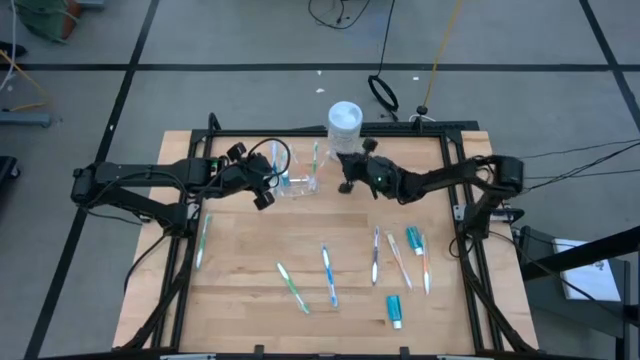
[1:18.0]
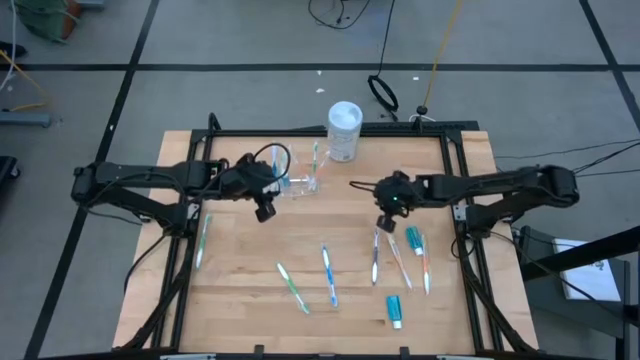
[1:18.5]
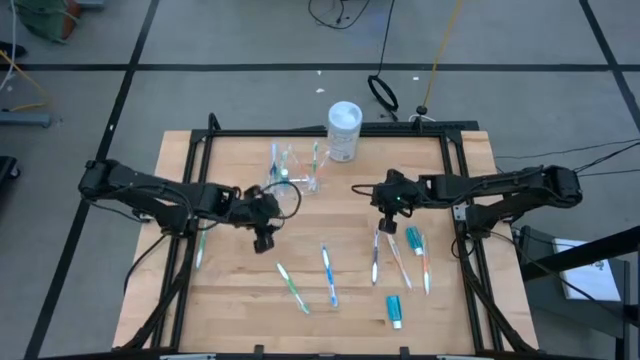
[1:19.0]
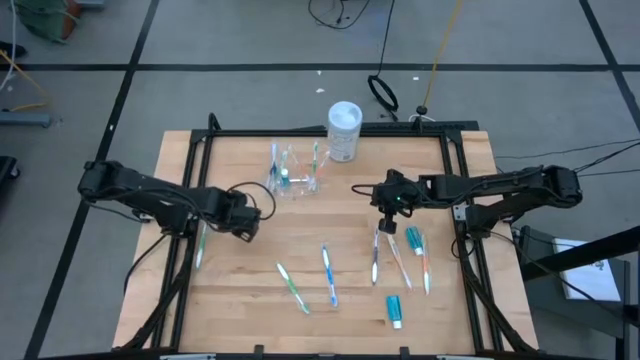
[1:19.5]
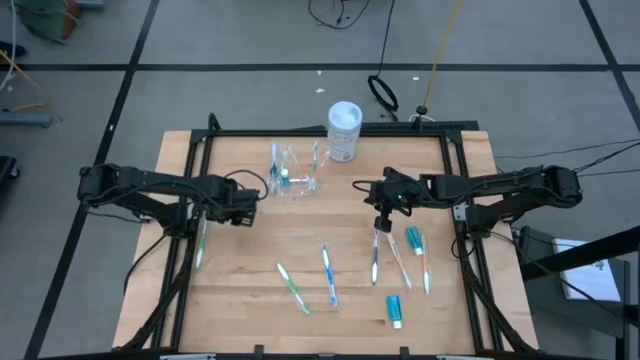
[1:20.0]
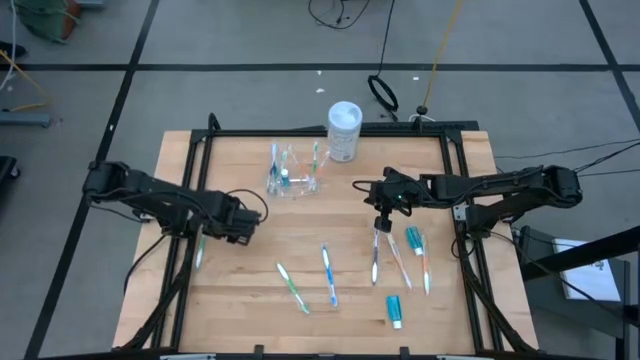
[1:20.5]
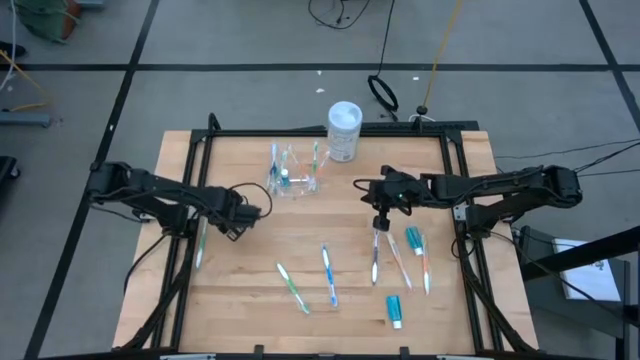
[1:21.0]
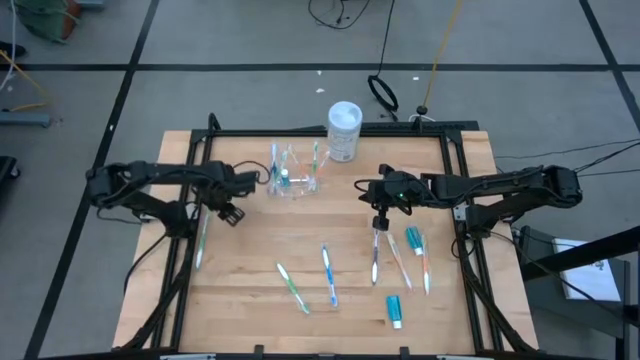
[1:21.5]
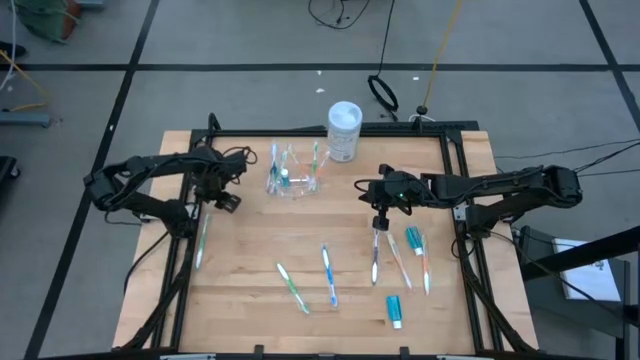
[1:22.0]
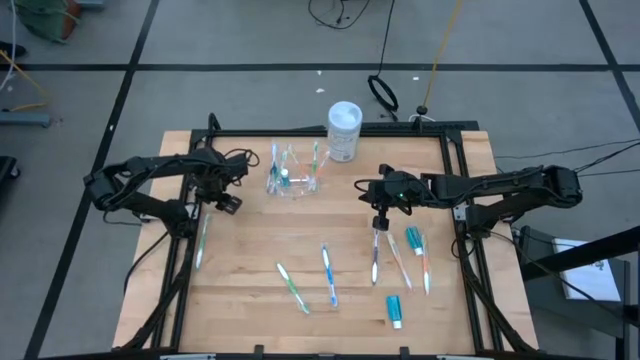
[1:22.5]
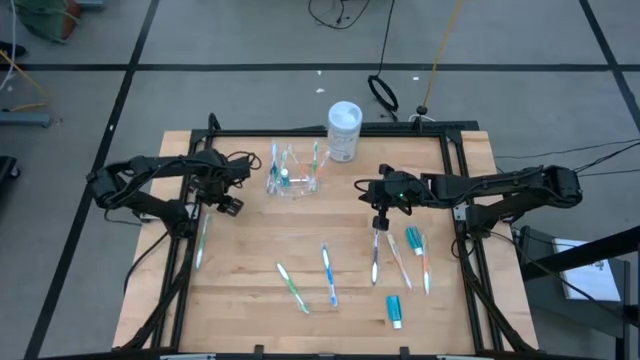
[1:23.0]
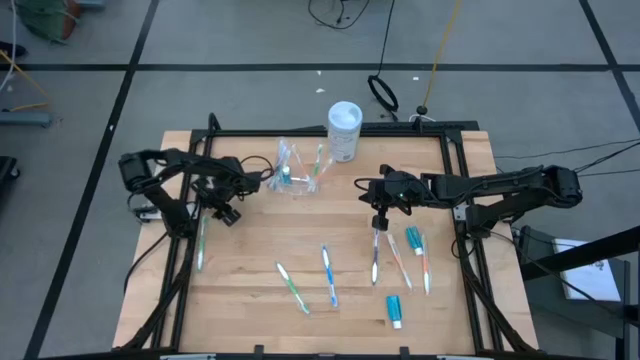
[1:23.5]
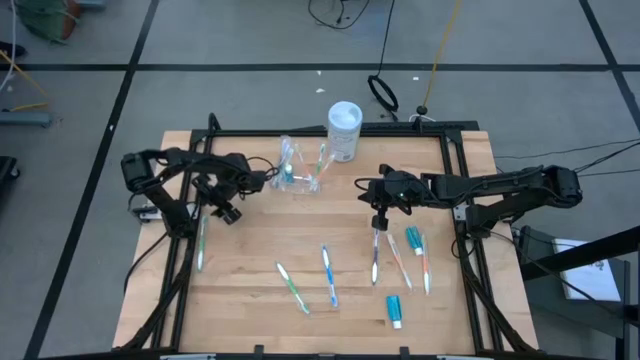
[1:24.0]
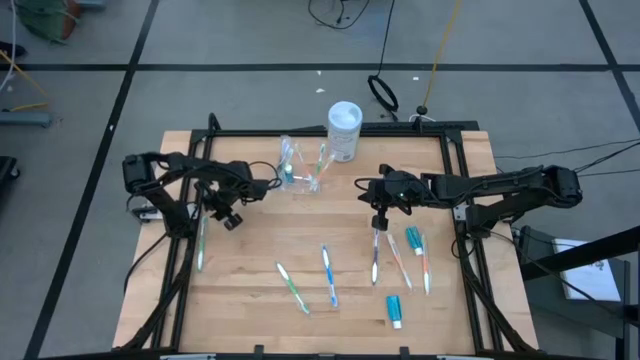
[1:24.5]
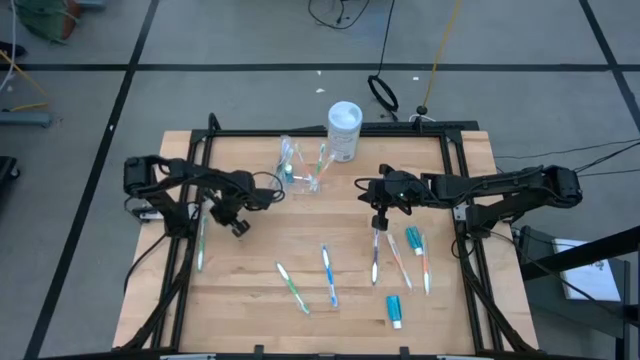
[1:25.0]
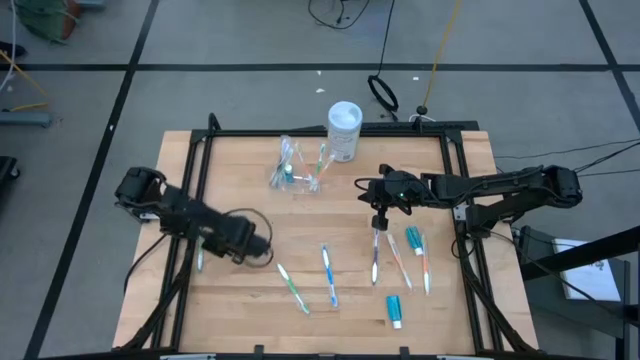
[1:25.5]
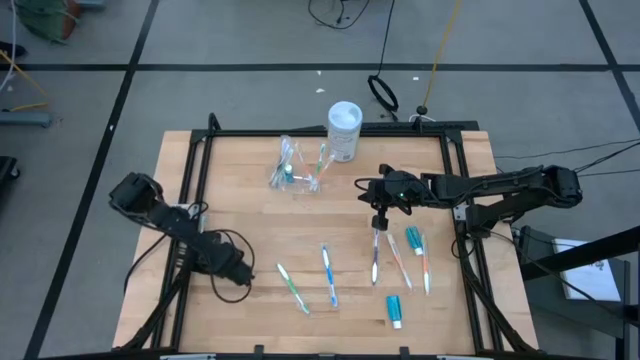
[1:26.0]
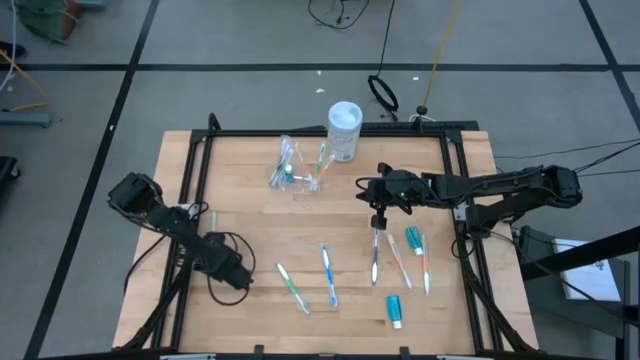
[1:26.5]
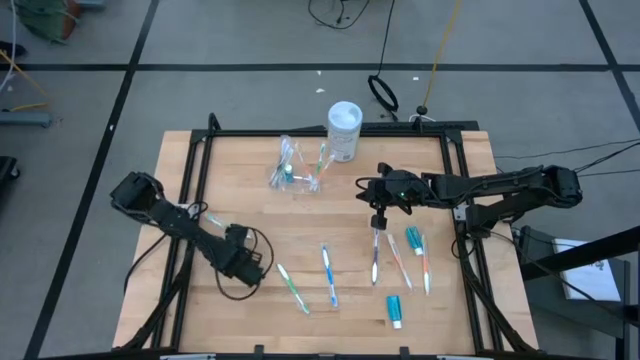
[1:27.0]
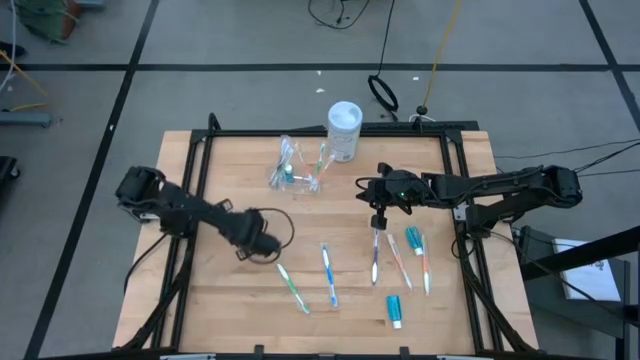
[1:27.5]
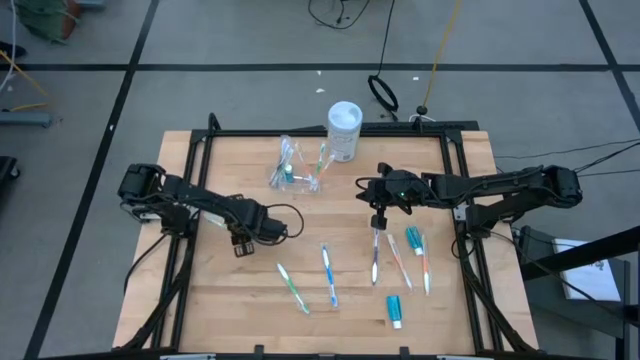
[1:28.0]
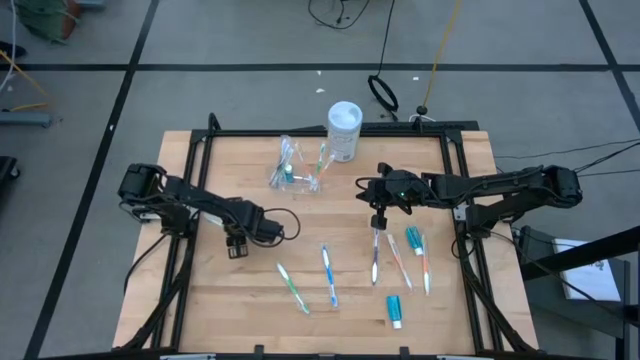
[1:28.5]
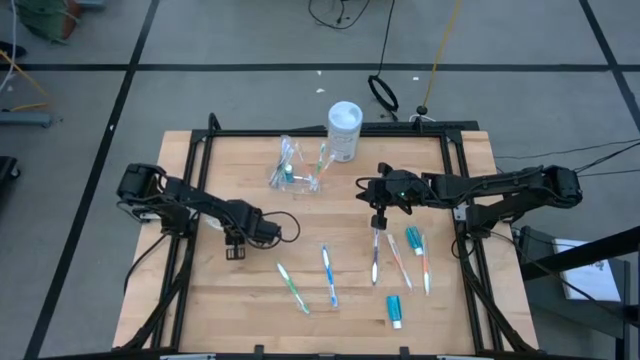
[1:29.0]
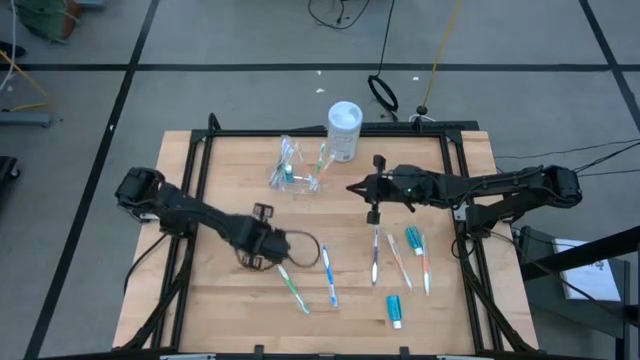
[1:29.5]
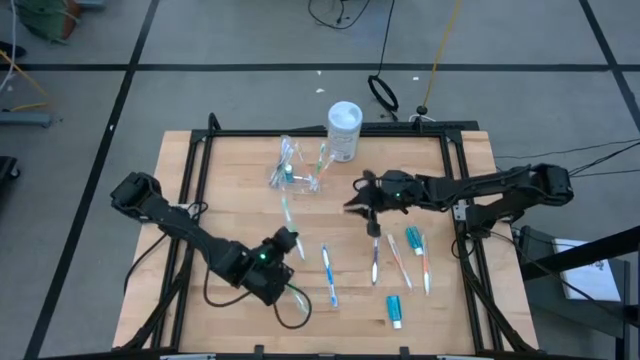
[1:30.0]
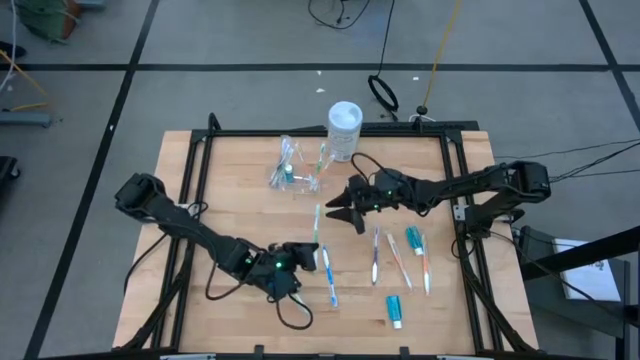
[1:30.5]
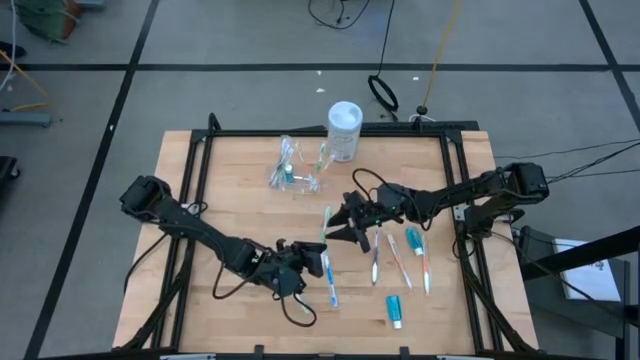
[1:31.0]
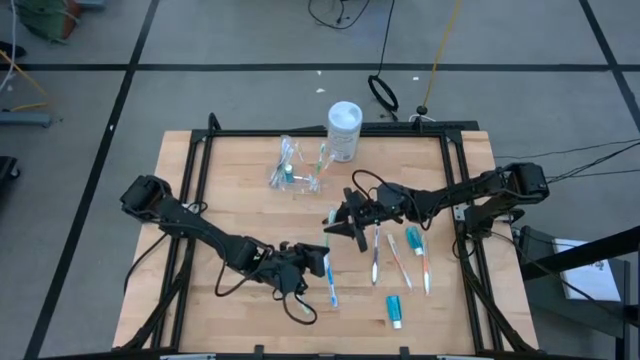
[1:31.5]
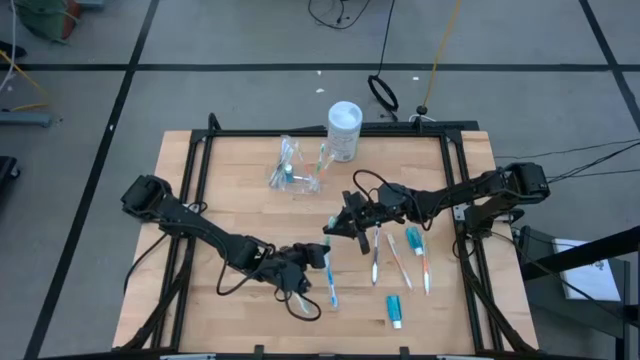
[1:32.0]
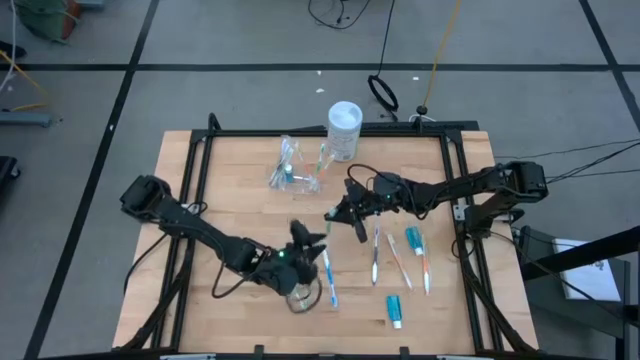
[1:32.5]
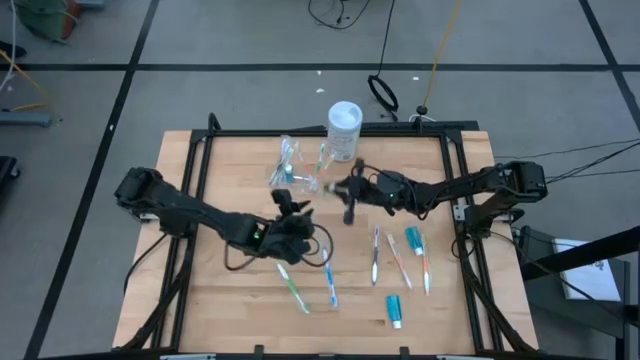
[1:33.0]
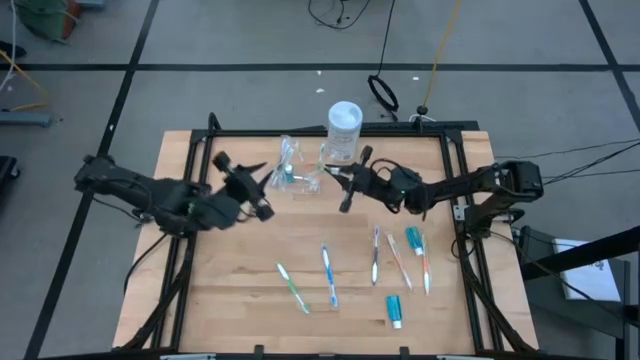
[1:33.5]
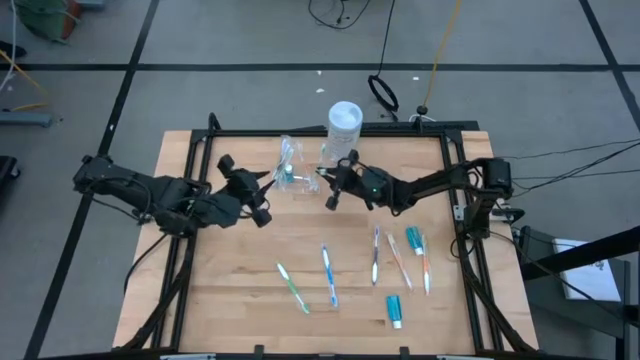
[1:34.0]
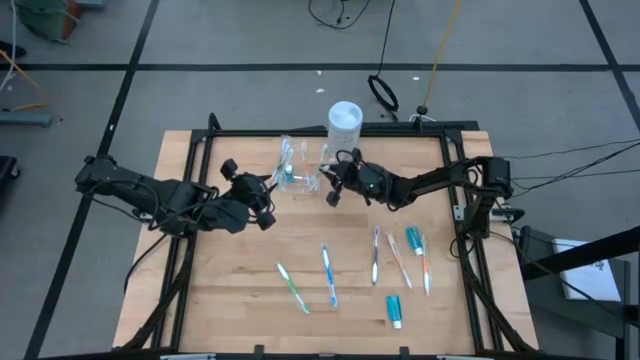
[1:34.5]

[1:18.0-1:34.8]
Task: Pick & Place toothbrushing station
Put the green toothbrush into the transparent organizer

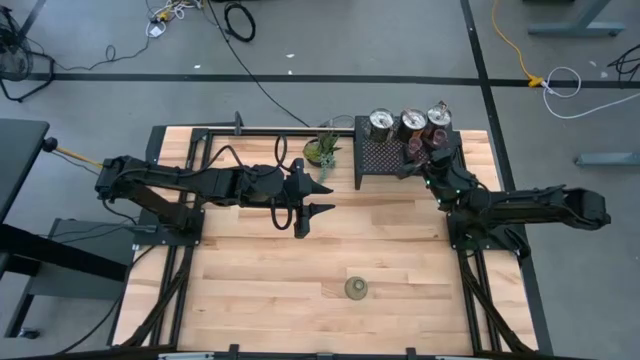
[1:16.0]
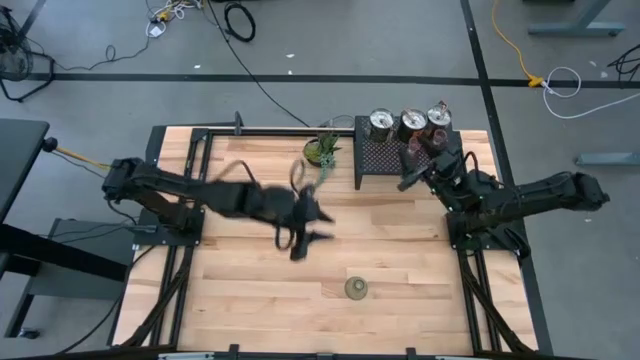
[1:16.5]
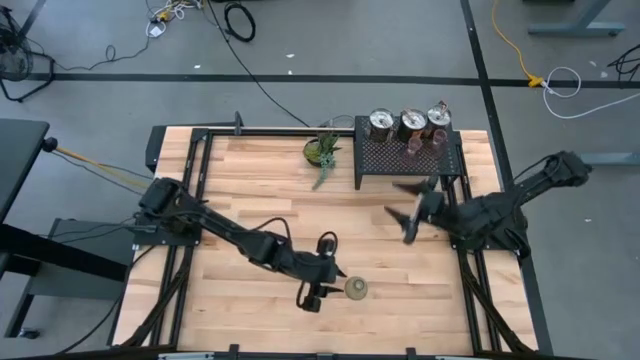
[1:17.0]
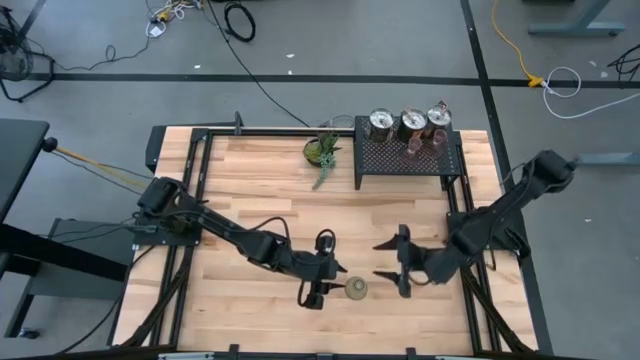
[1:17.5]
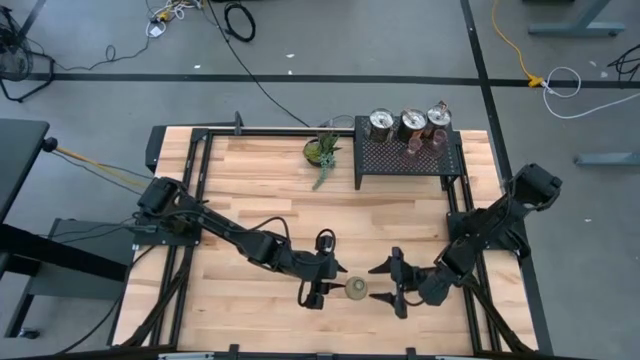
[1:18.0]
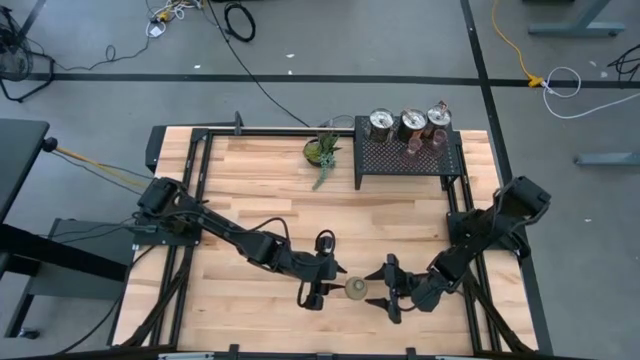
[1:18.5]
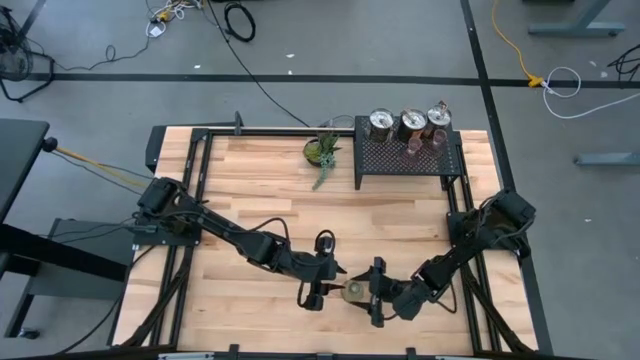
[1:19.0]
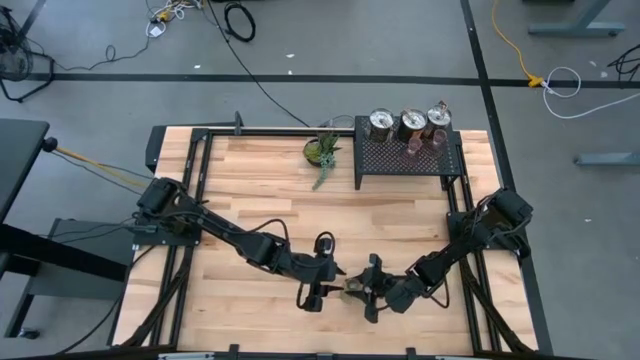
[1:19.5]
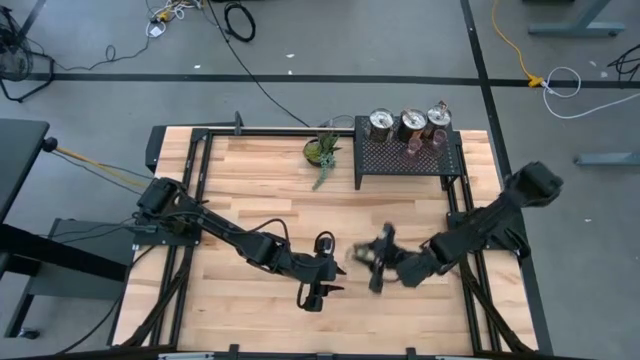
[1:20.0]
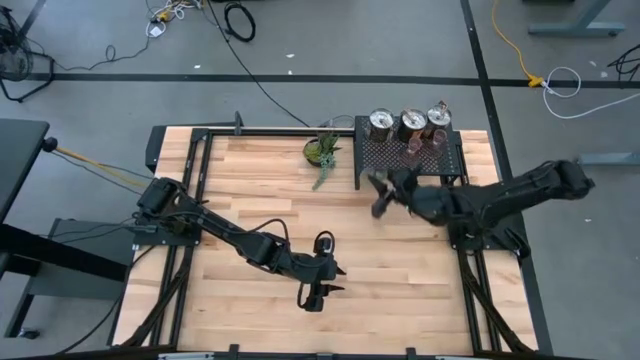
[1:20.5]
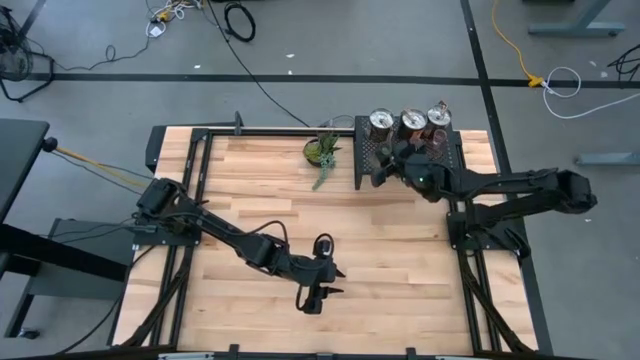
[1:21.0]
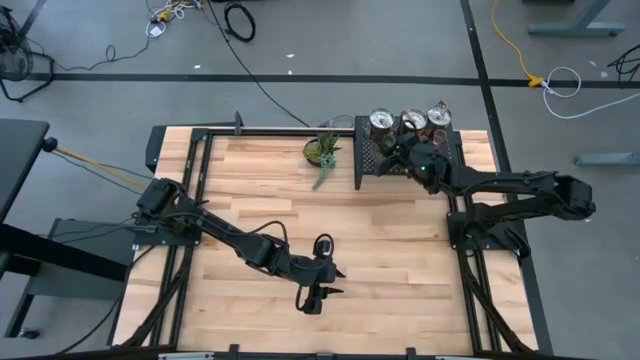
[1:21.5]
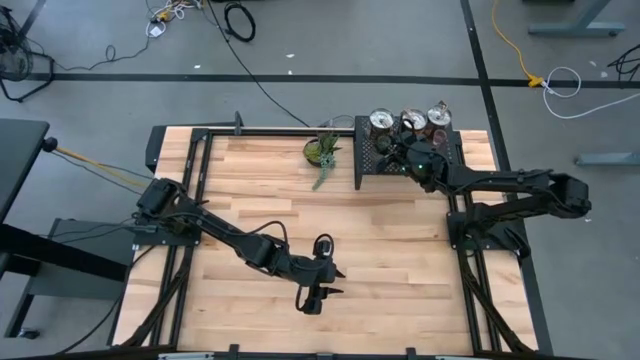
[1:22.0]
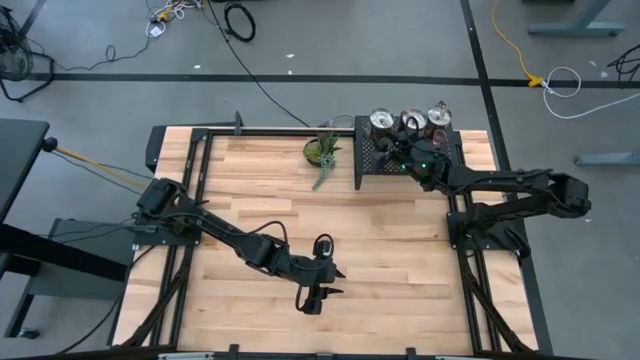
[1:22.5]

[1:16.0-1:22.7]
Task: Pick & Place candle stick holders
Align the green glass candle holder with the pink glass candle holders on the shelf
